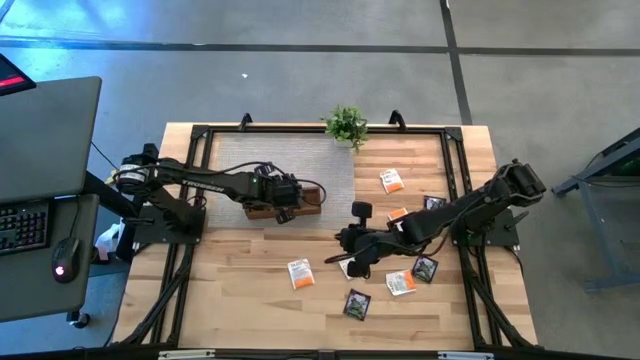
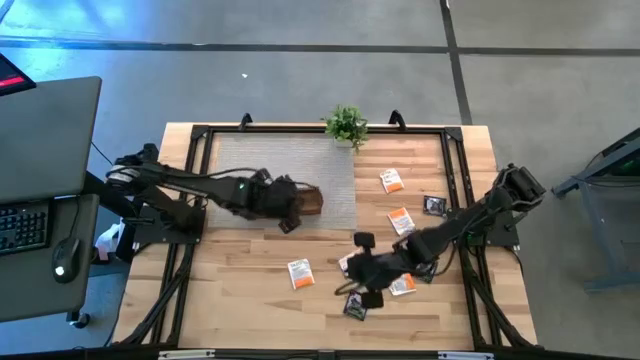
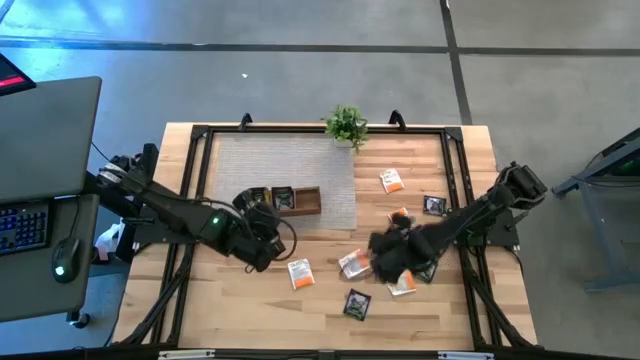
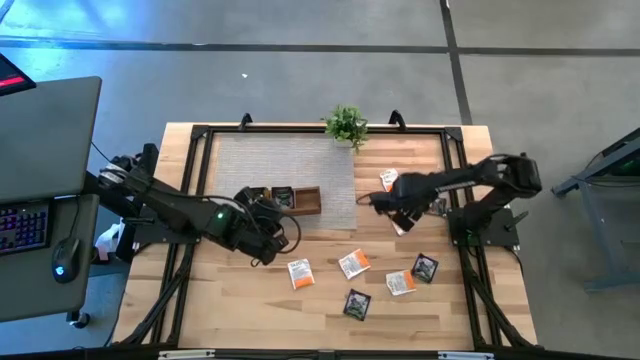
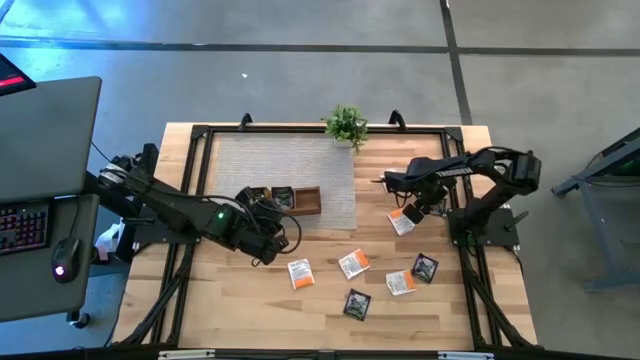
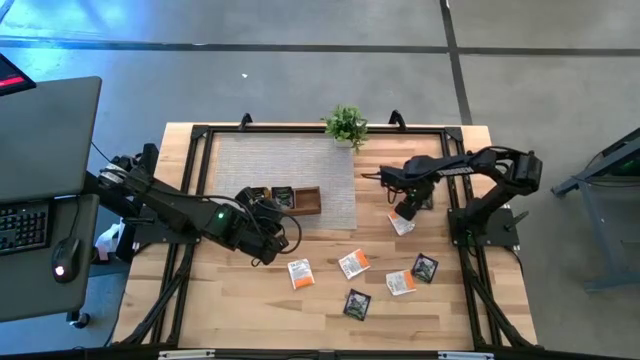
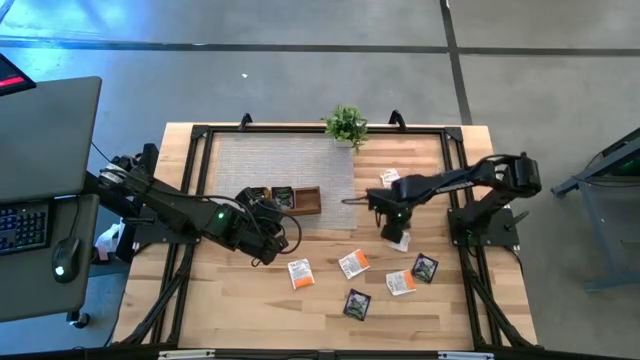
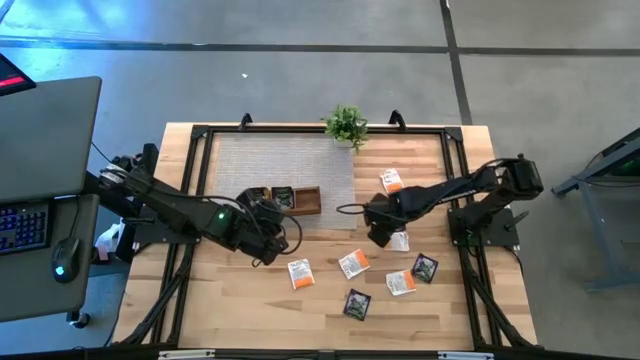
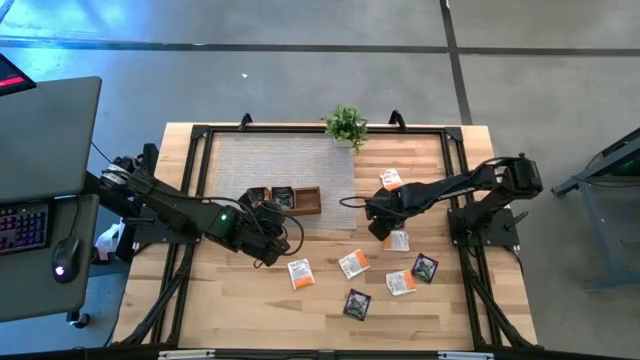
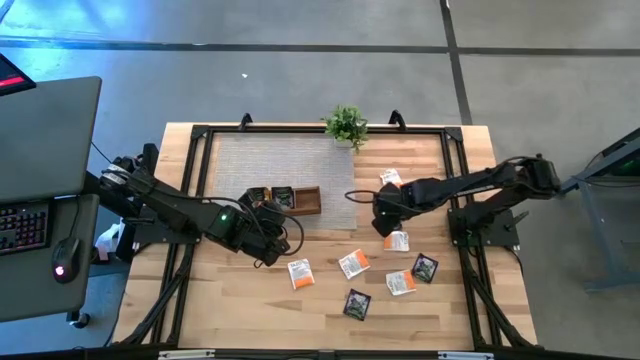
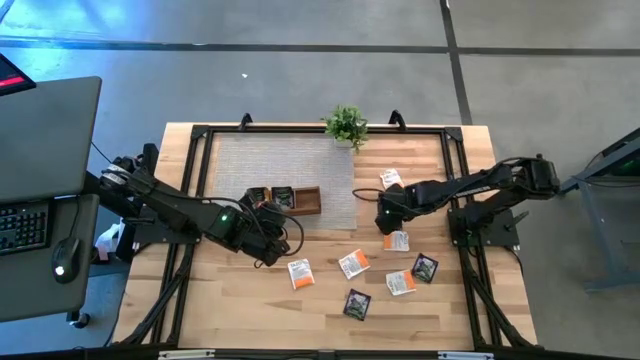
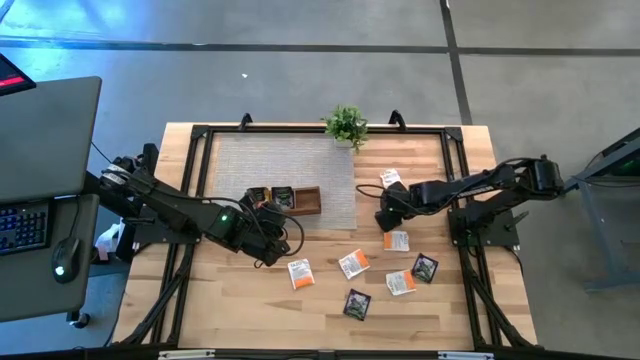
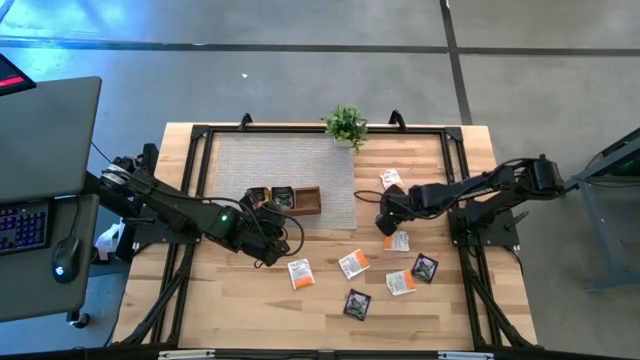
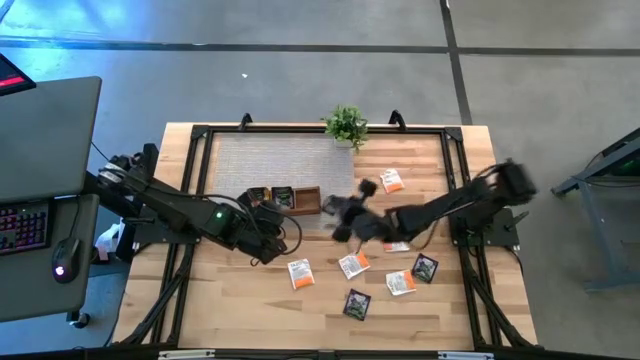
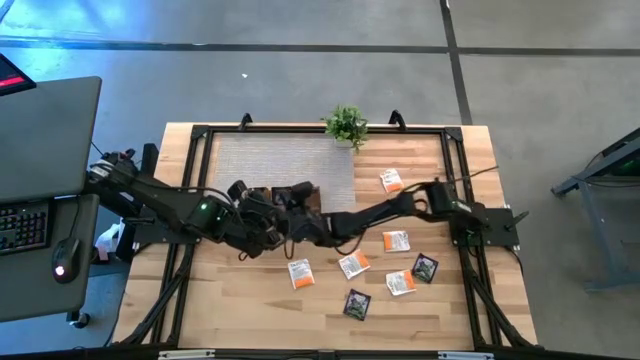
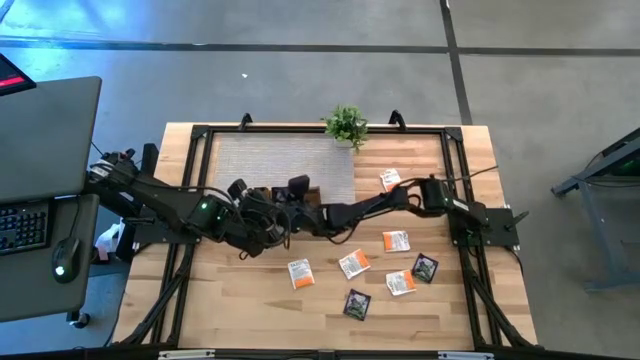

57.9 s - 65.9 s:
Task: Pick & Place Tea
Put the purple tea bag into the middle section of the wooden organizer

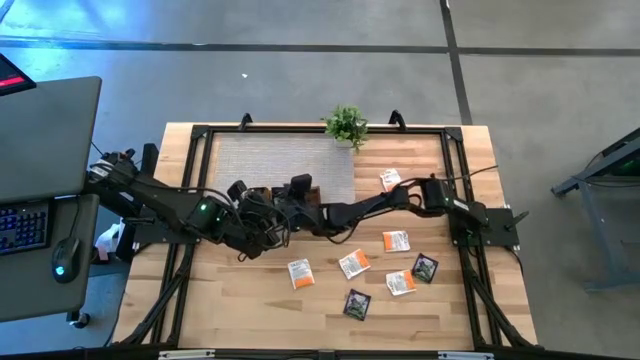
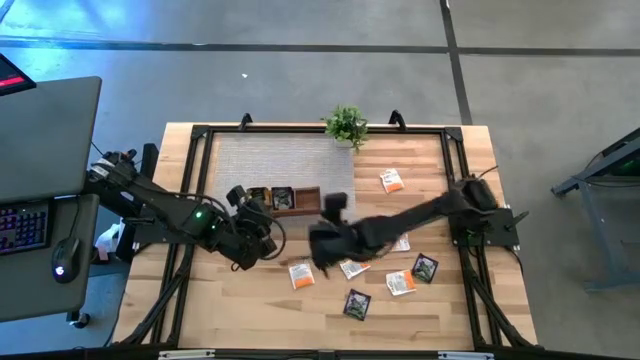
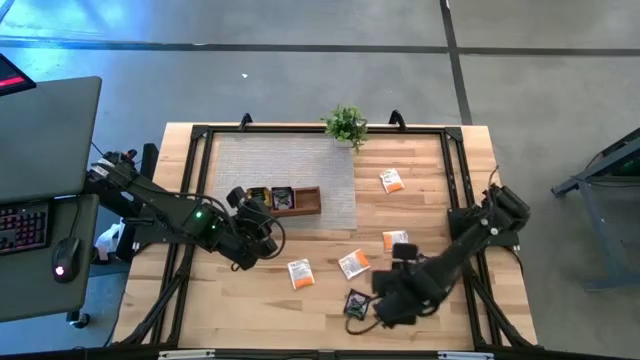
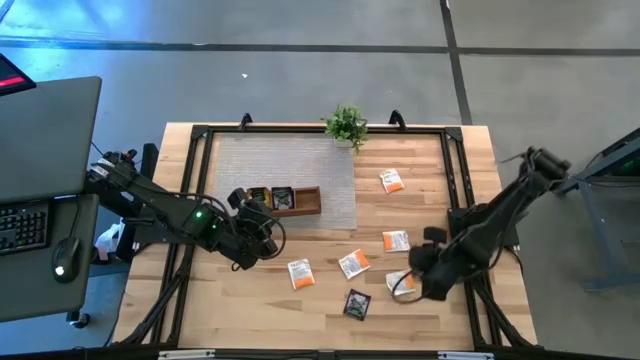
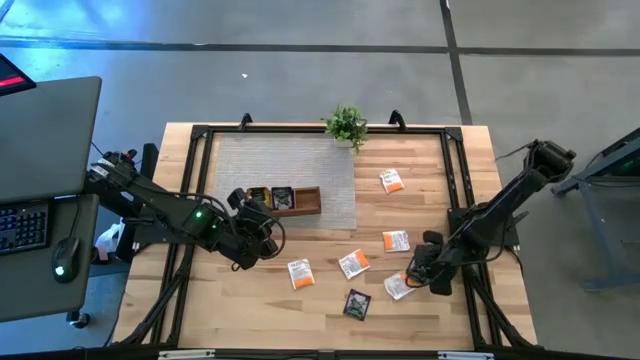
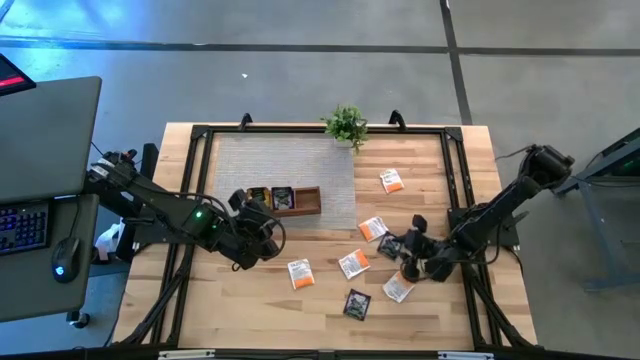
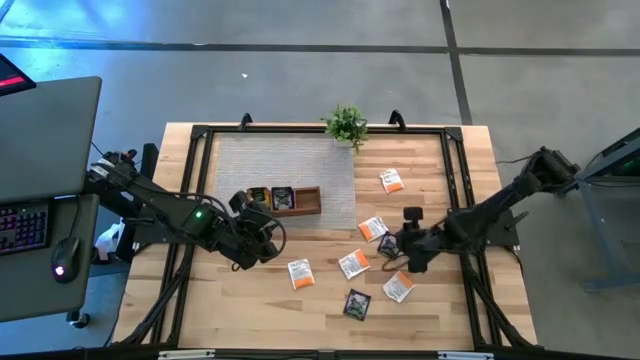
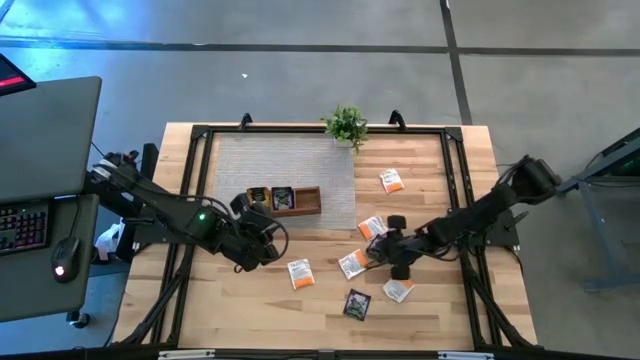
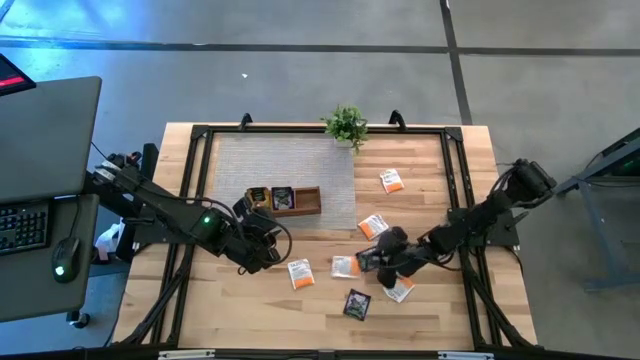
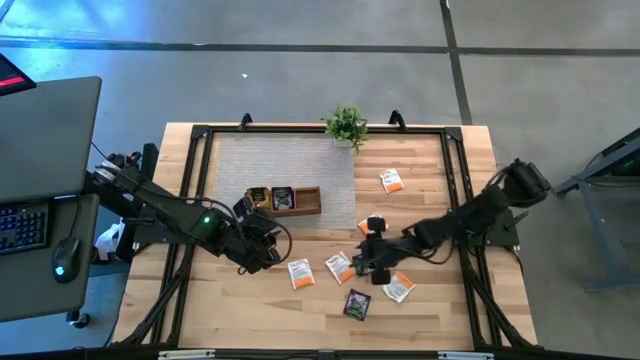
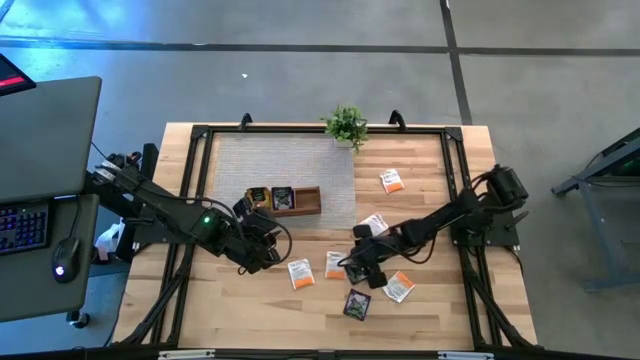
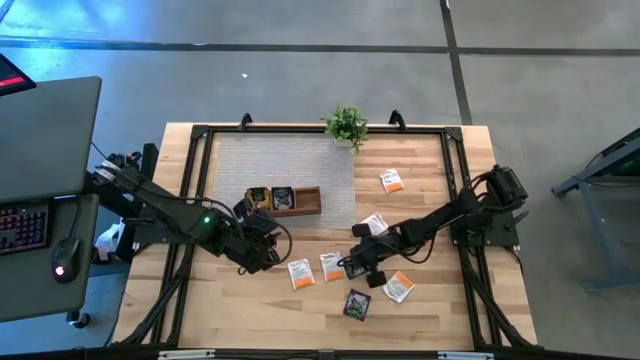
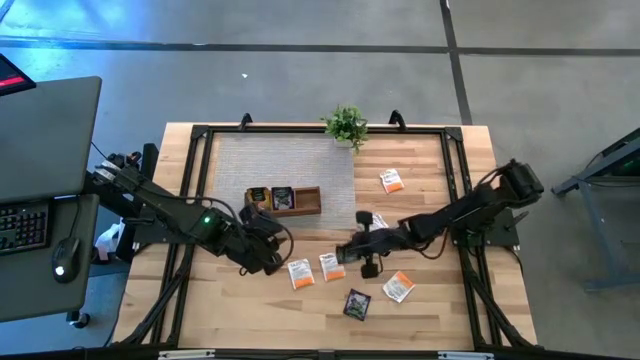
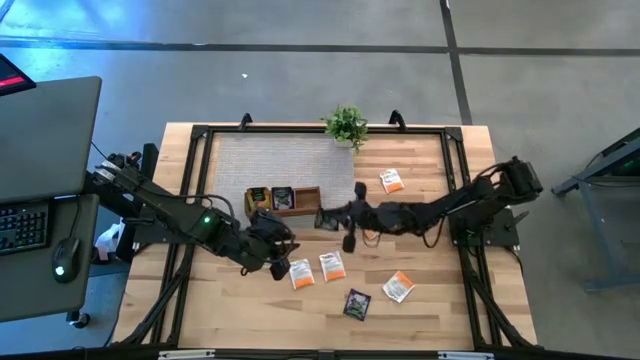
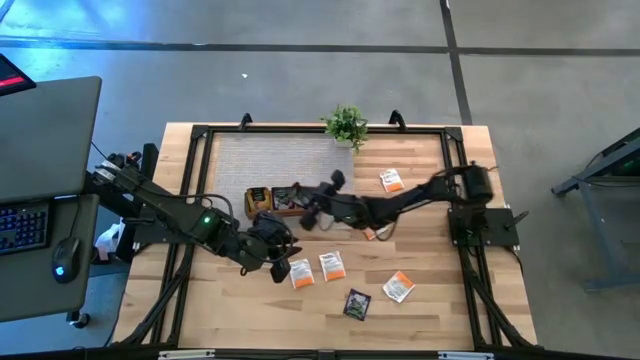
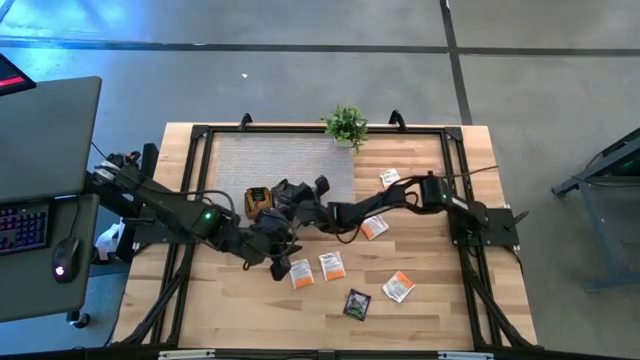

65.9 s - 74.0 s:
Put the purple tea bag into the middle section of the wooden organizer

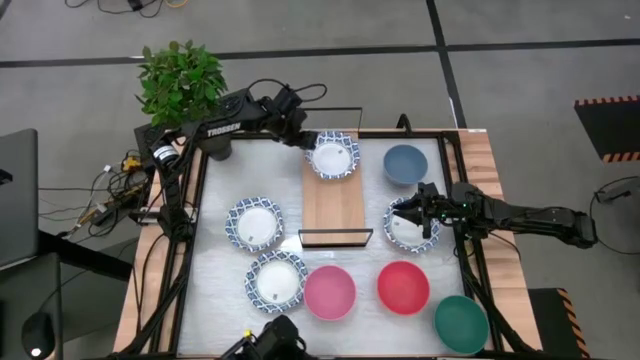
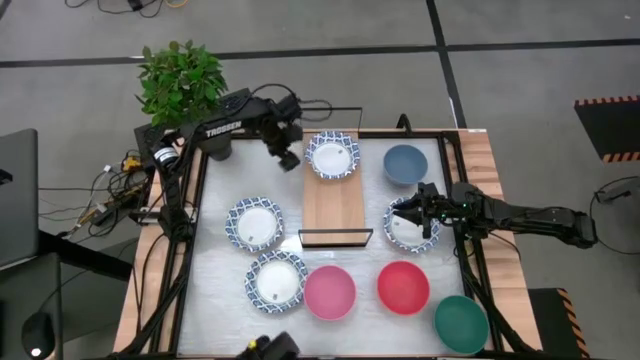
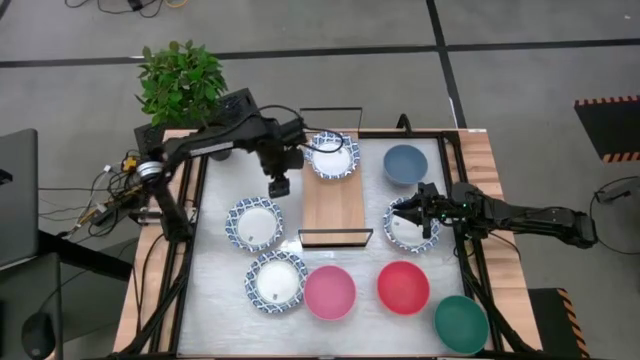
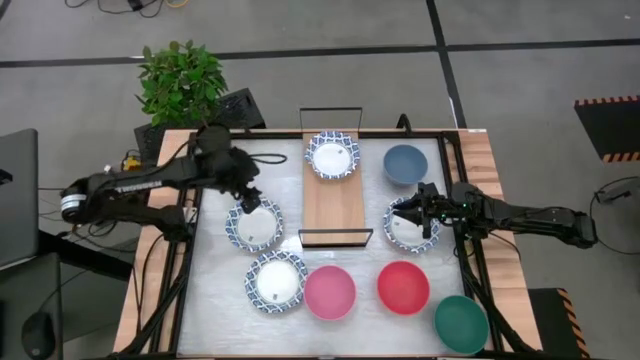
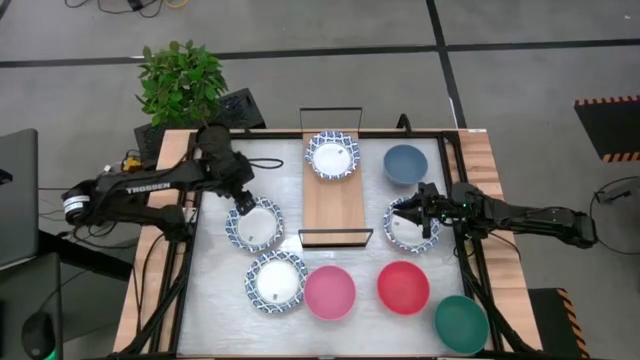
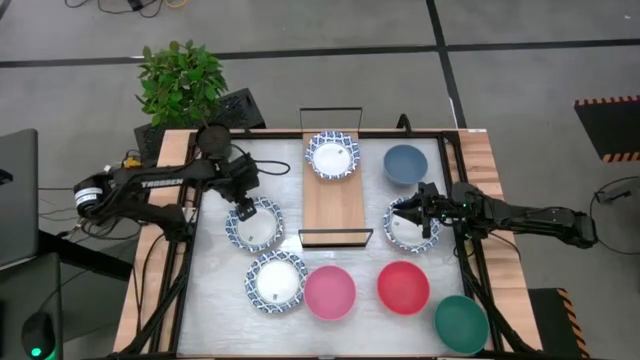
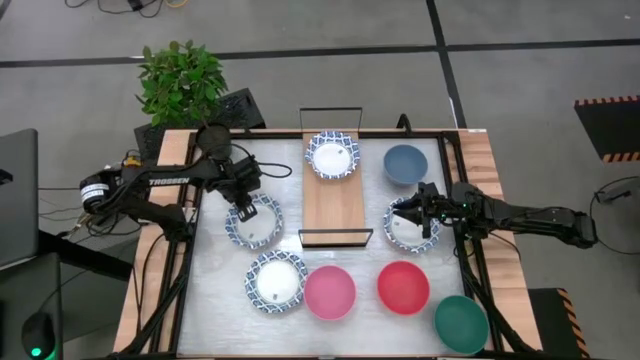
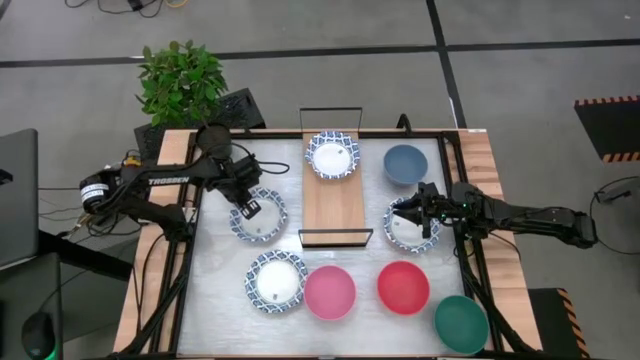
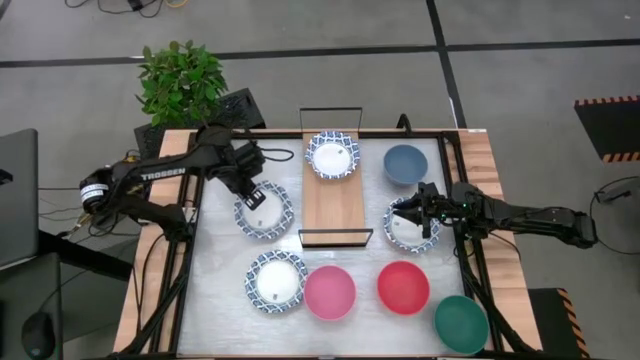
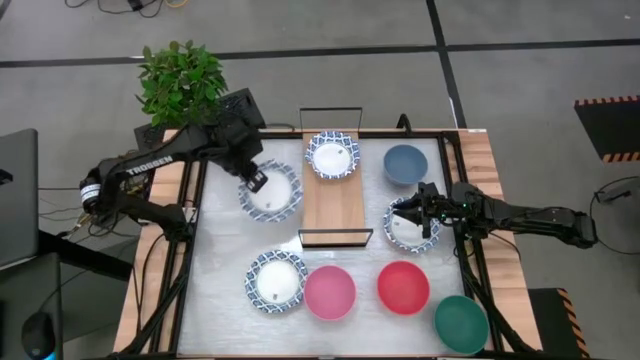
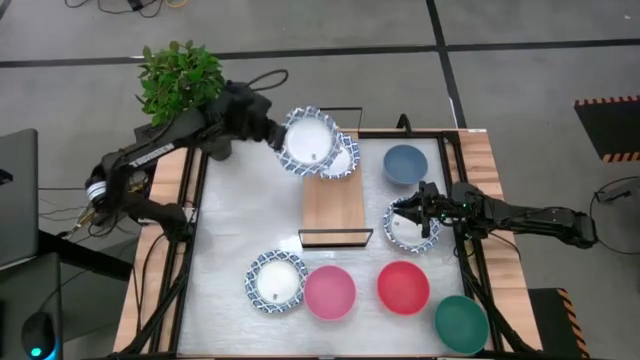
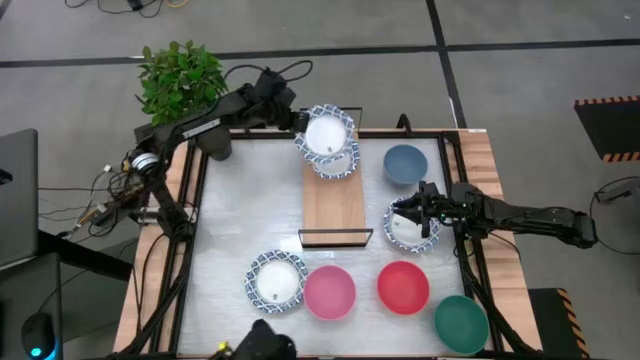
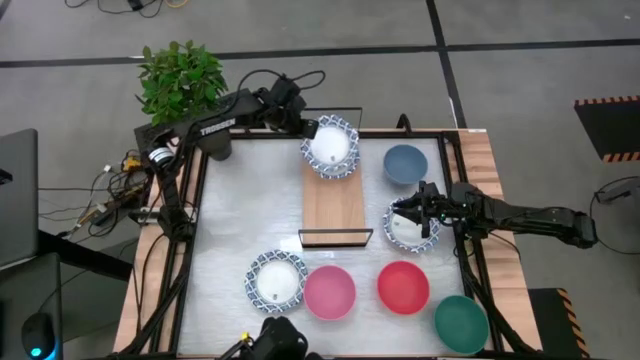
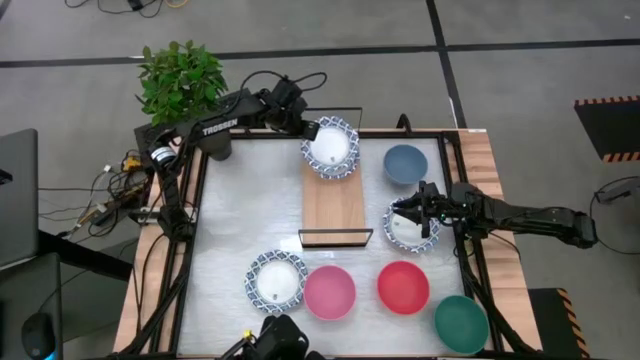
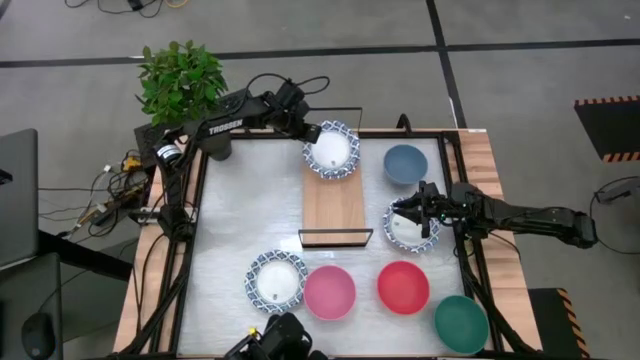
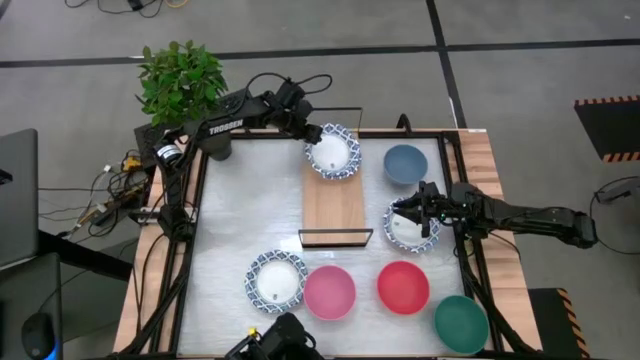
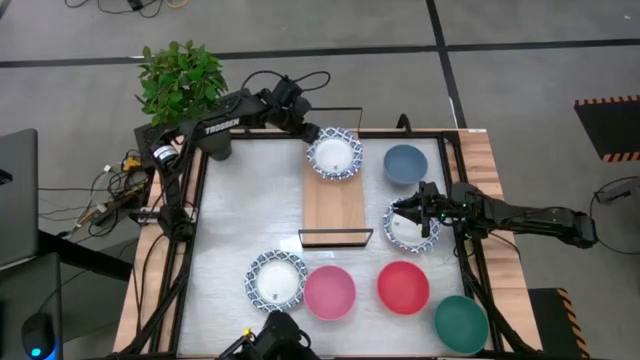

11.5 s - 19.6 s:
Task: Place and stack bowls onto a shelf
Stack the blue patterned bowl on top of the blue patterned bowl on the shelf
